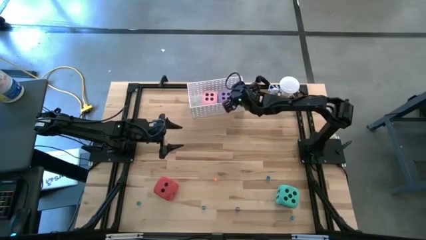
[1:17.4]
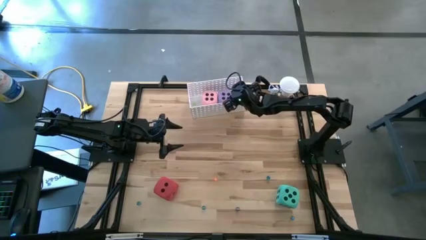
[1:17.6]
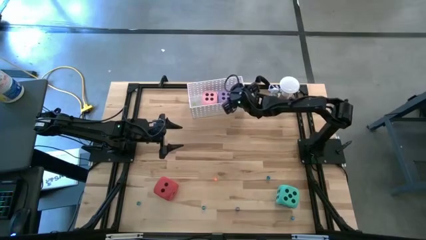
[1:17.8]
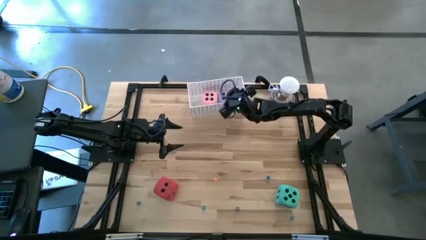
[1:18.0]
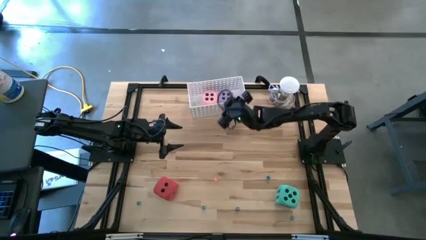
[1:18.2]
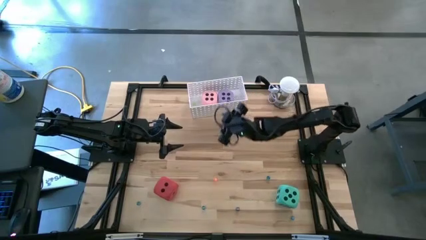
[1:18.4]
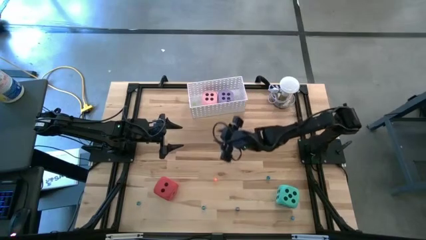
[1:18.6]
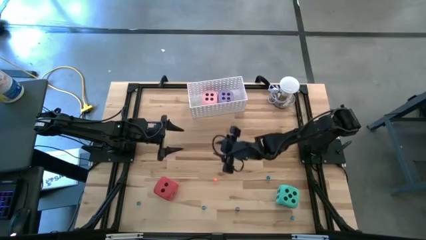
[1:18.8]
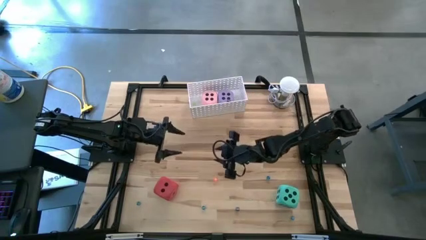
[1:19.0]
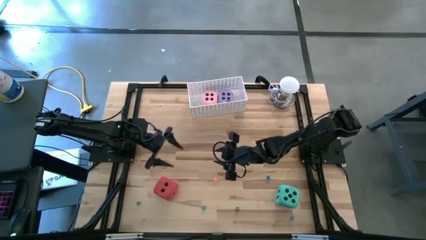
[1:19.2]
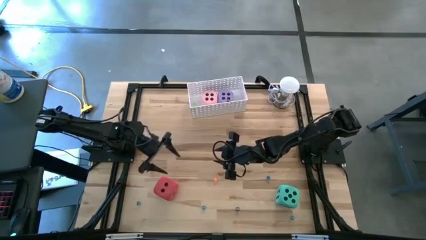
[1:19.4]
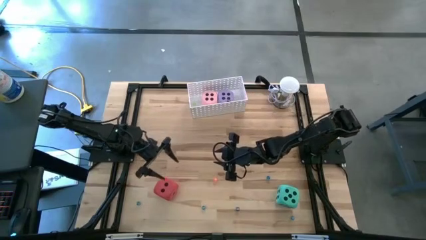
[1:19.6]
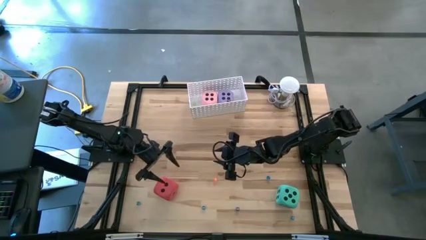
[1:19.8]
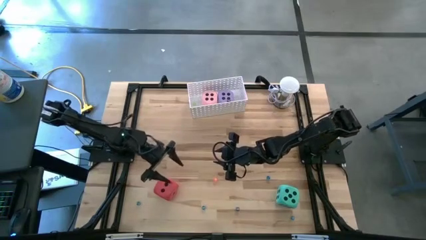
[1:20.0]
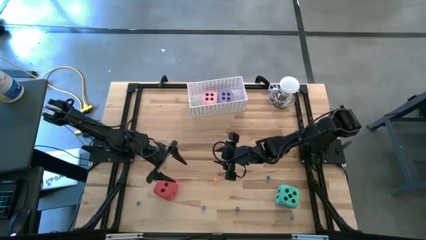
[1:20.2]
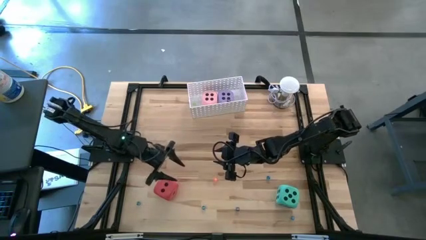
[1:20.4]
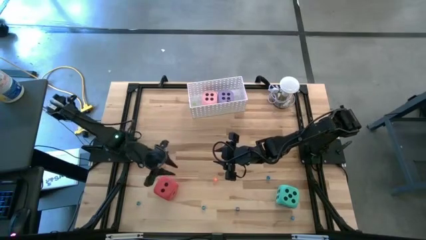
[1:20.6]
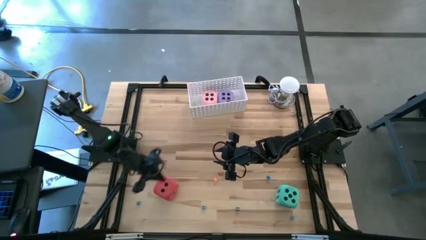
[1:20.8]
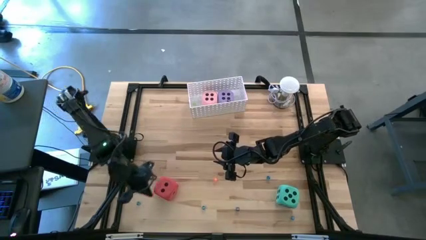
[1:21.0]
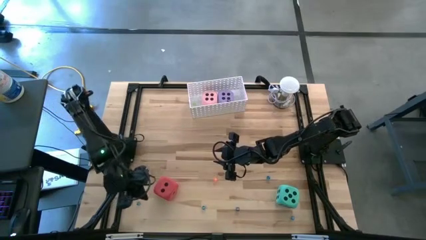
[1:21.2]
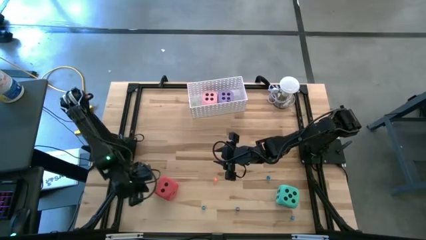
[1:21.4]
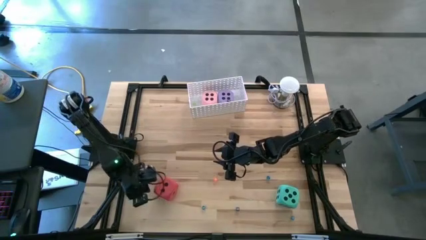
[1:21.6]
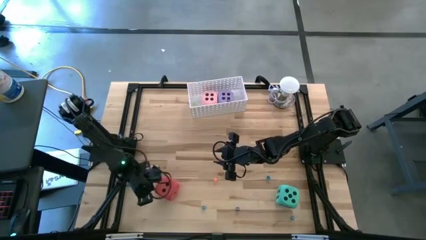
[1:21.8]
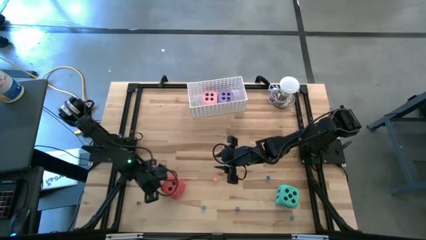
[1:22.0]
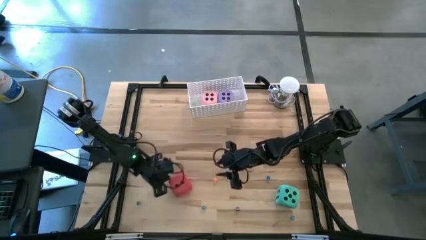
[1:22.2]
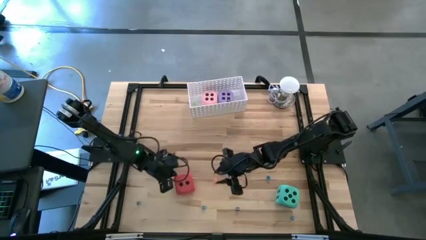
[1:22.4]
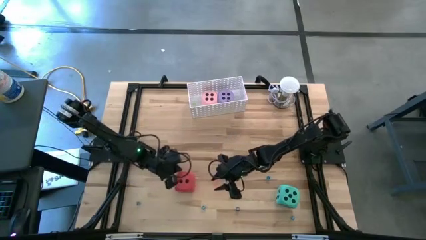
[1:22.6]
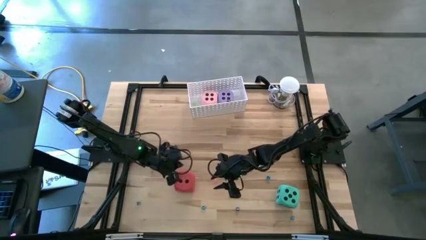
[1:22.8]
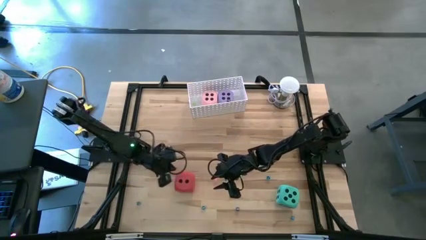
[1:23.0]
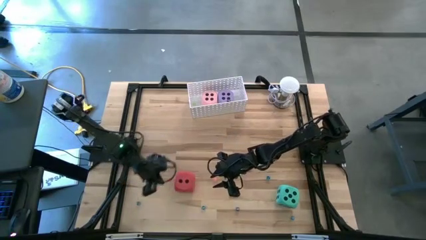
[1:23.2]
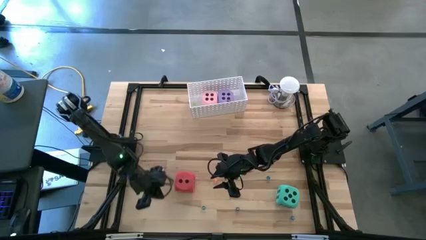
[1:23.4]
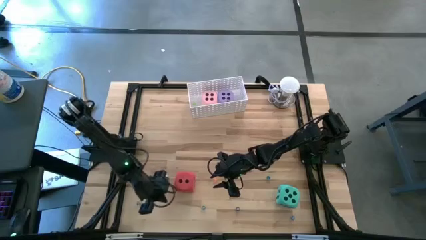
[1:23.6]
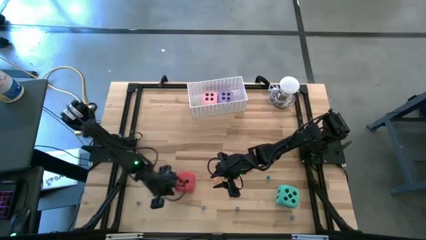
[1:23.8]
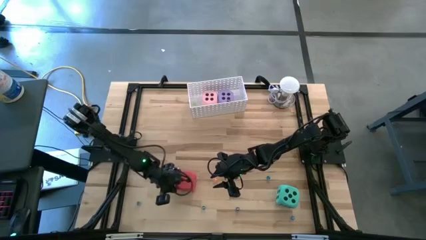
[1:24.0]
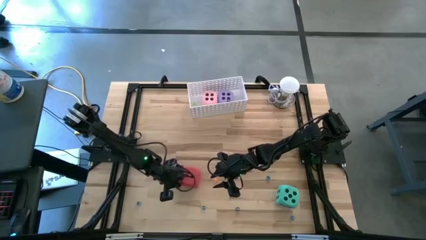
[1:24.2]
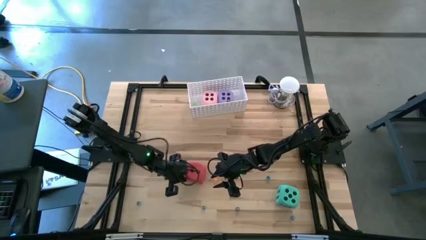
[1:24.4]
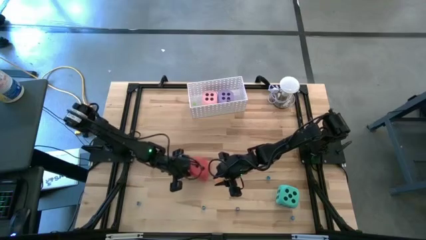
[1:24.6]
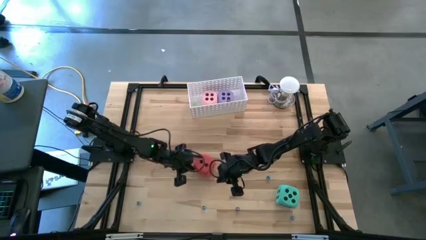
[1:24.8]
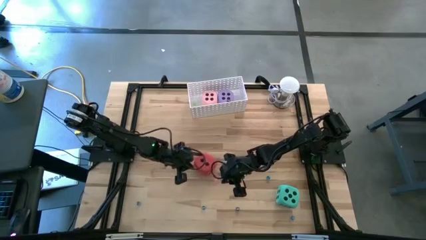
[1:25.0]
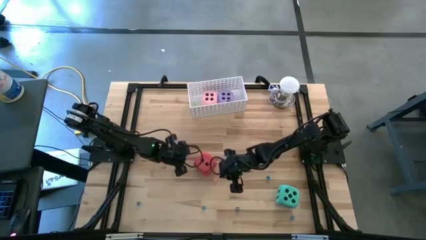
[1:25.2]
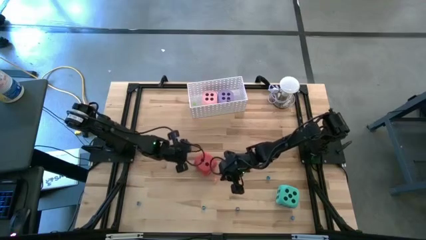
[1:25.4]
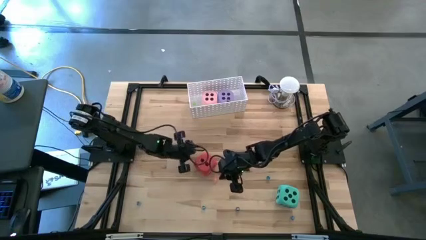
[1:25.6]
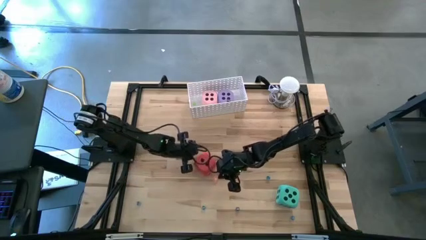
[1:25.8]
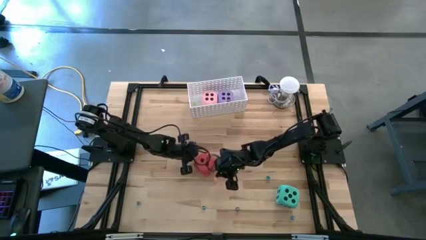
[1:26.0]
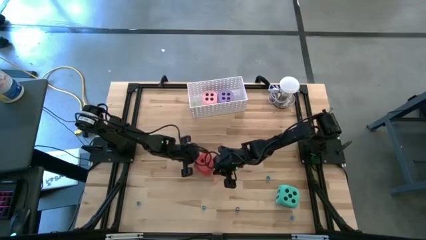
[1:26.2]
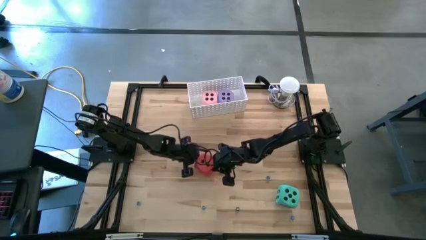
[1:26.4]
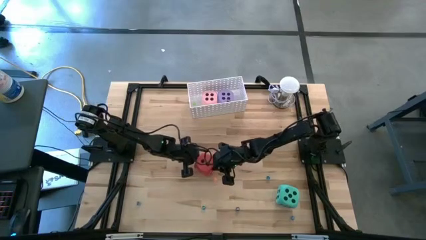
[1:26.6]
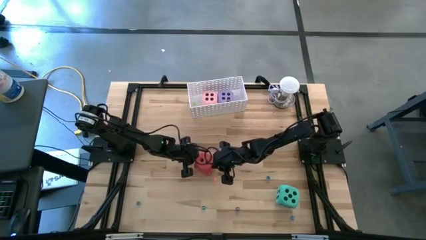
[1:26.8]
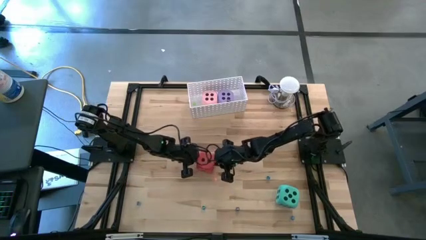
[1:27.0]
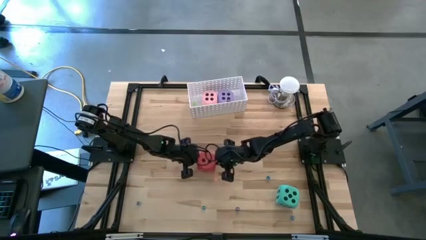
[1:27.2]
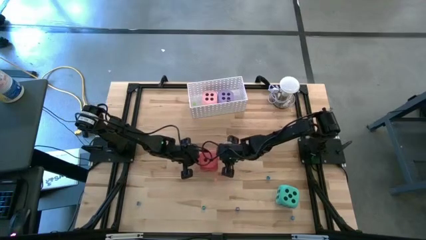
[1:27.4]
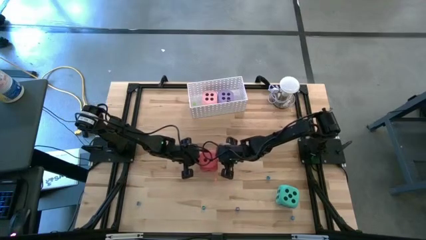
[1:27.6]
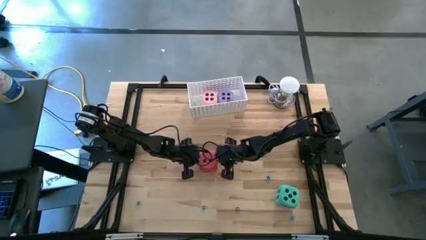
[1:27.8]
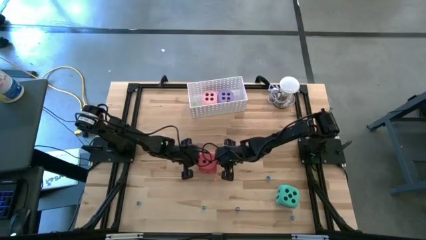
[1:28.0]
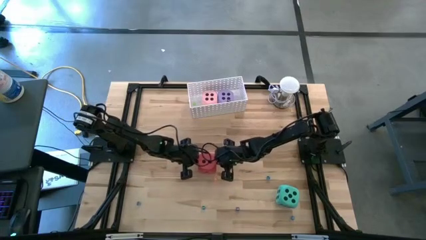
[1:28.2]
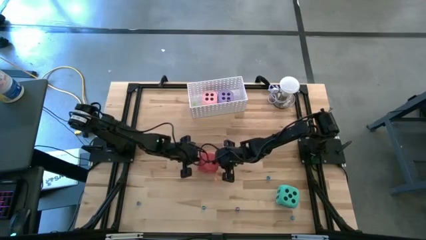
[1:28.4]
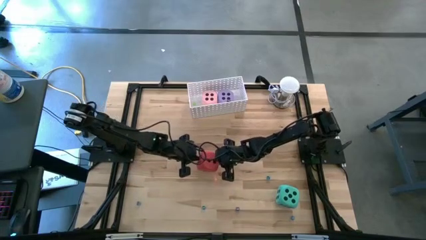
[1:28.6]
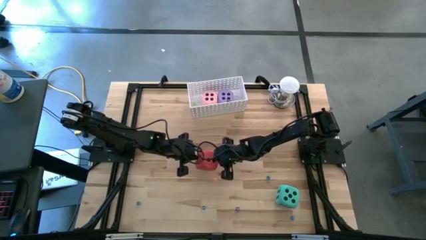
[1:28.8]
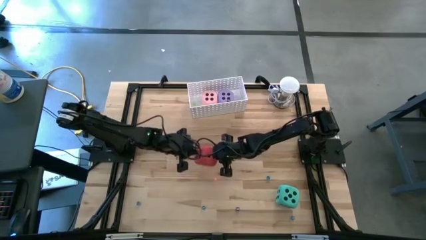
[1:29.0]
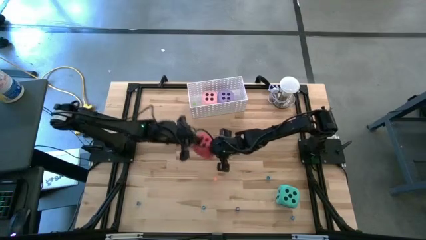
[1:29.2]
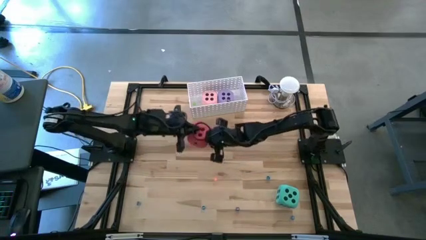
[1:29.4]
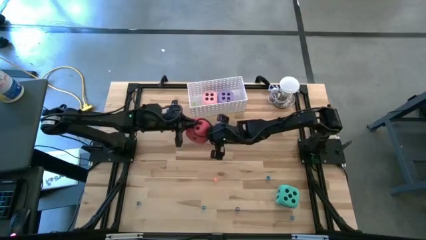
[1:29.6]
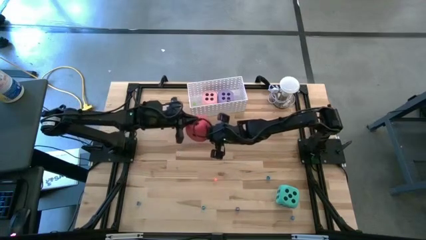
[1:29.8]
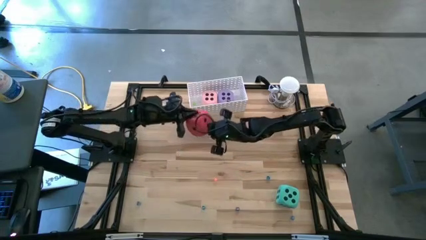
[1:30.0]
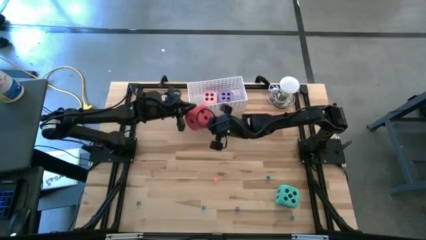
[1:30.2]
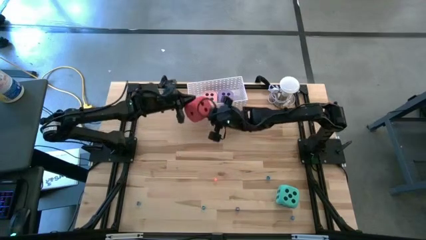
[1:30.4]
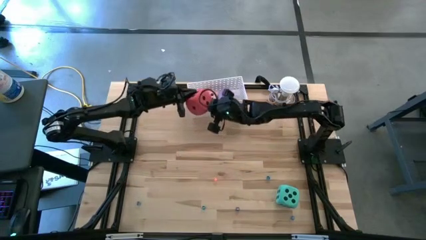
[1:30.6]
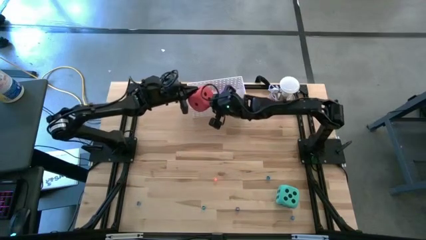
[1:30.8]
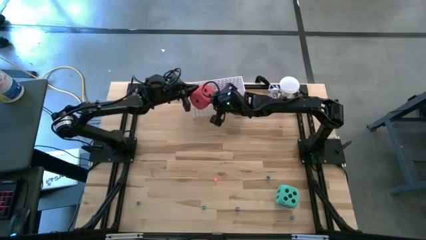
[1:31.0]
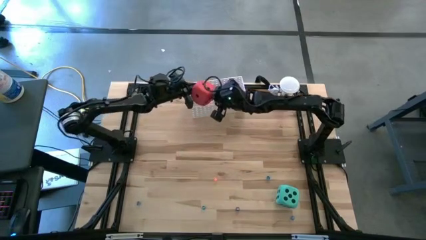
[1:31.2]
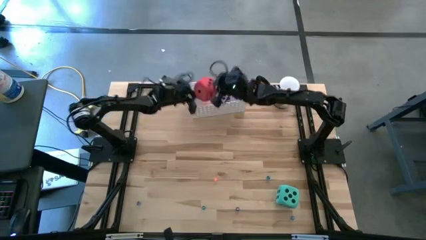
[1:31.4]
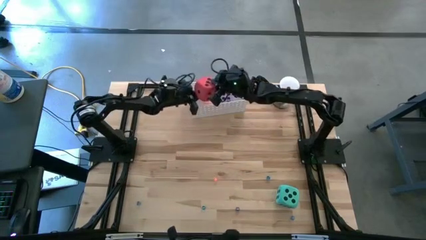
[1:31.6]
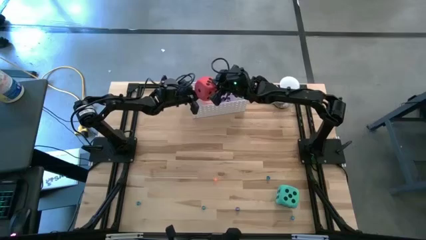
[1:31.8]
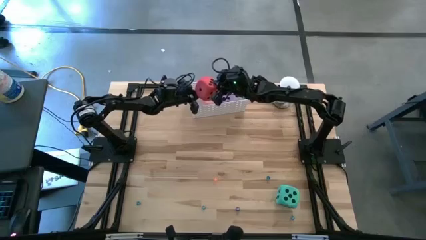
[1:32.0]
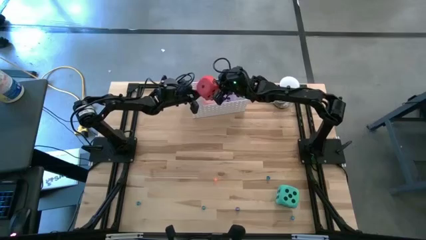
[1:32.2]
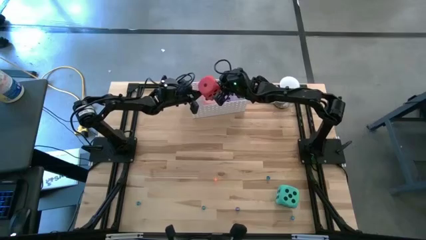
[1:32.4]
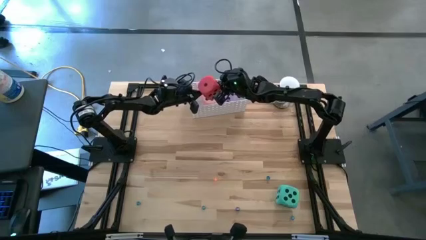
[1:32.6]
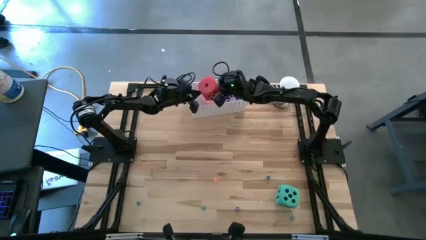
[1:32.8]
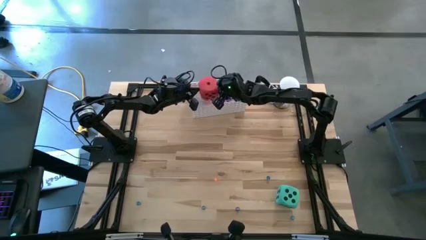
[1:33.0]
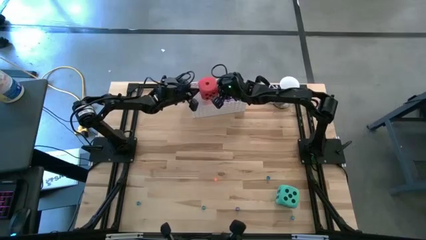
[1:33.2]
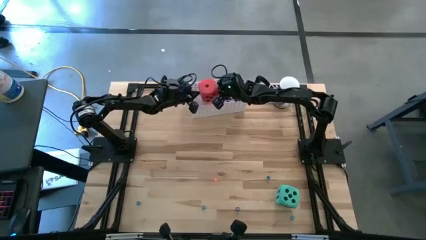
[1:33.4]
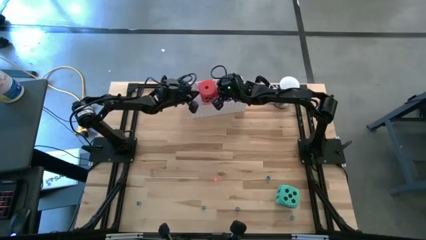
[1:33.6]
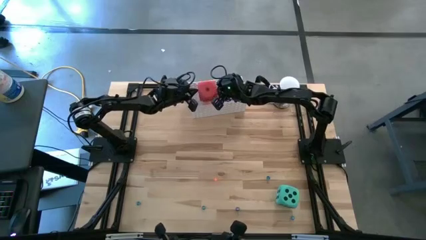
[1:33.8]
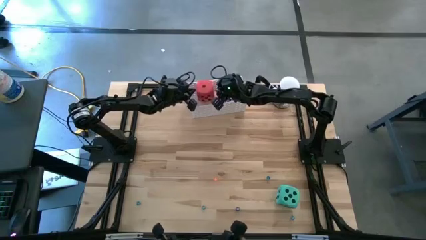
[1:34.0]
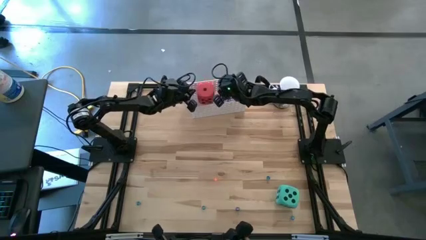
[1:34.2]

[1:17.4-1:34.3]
Task: Pick & Place Dice
Put the large dark pink dice into the white bin

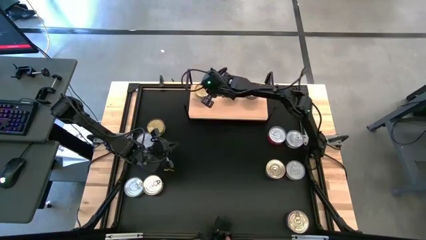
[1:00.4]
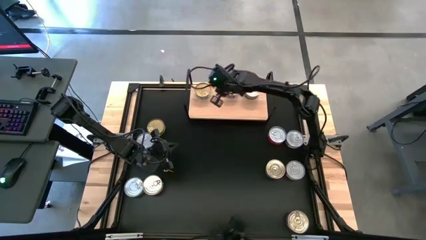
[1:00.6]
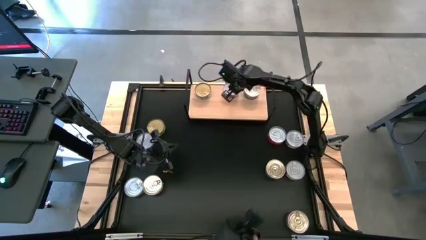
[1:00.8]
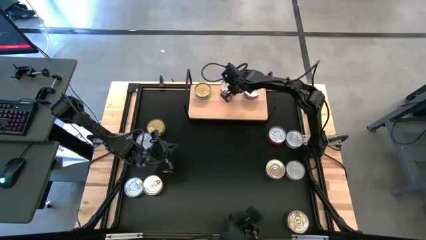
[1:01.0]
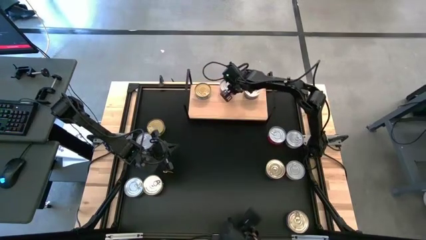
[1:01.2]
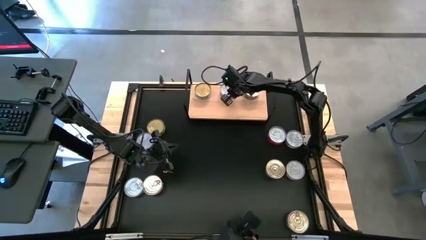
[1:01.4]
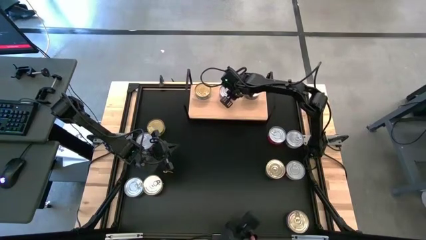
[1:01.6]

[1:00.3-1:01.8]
Task: Stack canned seafood by type on shelf
Adjust the red tuna can on the shelf
